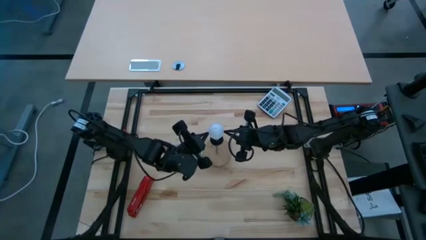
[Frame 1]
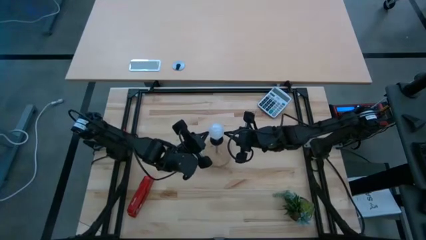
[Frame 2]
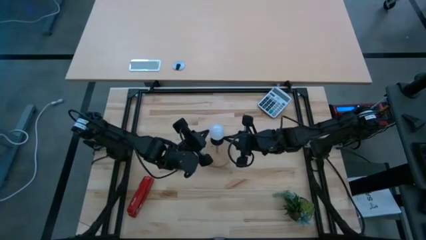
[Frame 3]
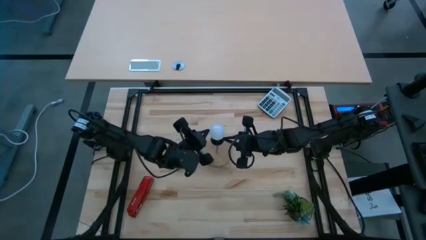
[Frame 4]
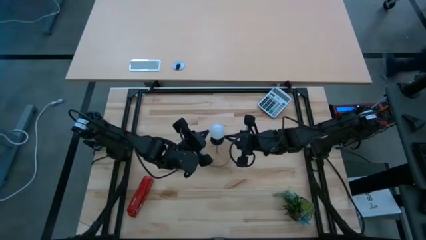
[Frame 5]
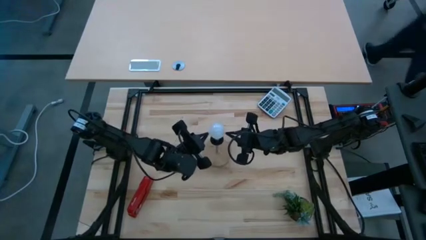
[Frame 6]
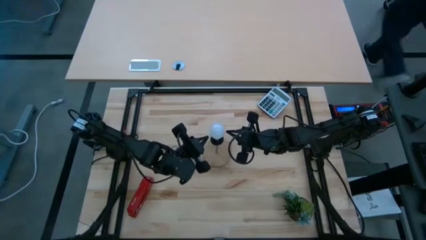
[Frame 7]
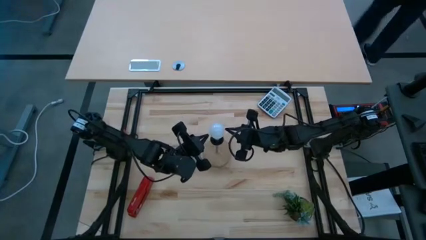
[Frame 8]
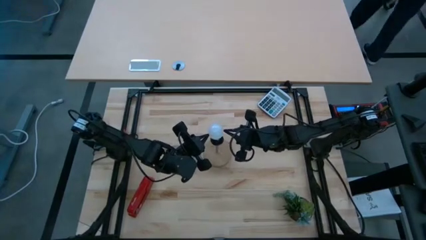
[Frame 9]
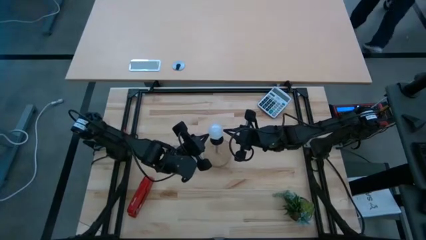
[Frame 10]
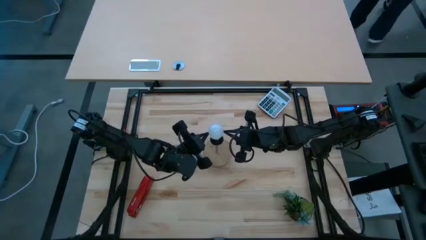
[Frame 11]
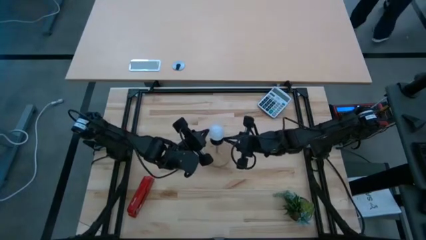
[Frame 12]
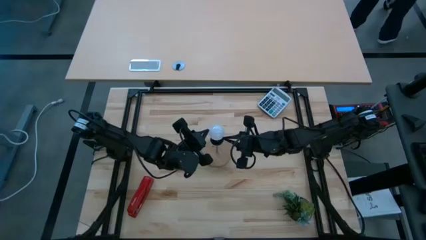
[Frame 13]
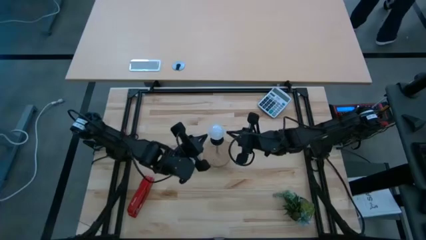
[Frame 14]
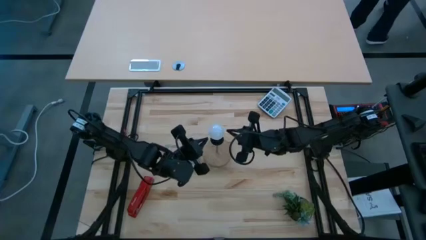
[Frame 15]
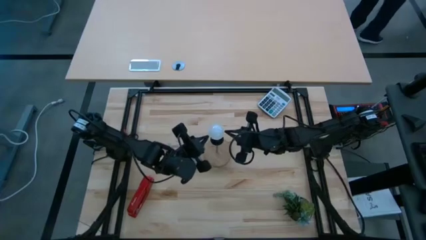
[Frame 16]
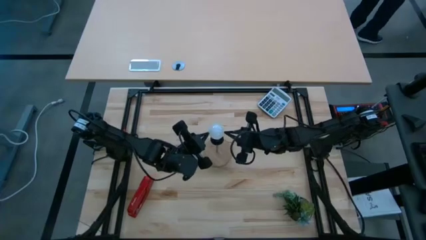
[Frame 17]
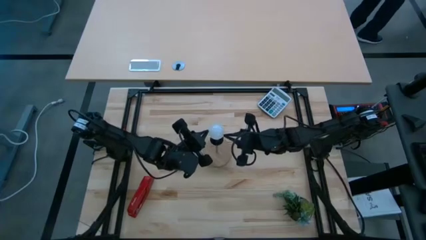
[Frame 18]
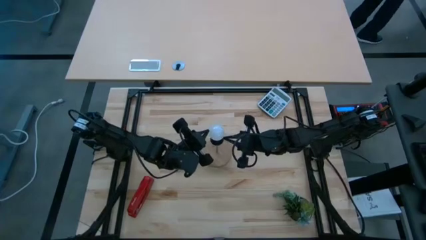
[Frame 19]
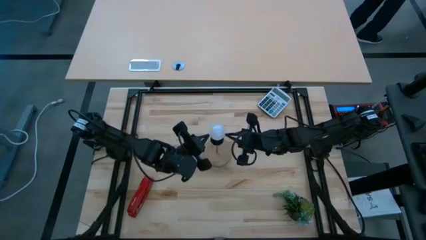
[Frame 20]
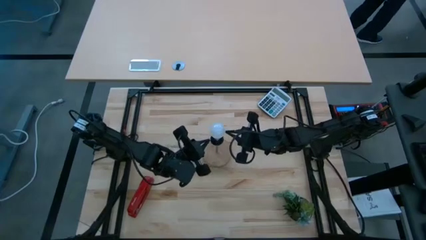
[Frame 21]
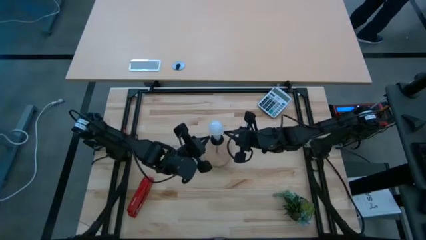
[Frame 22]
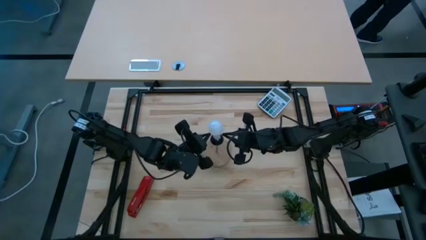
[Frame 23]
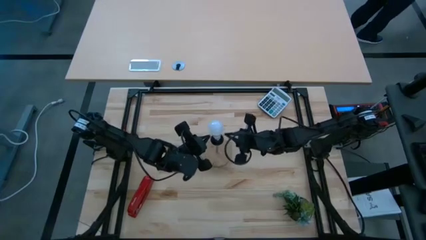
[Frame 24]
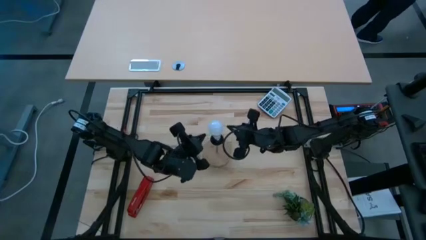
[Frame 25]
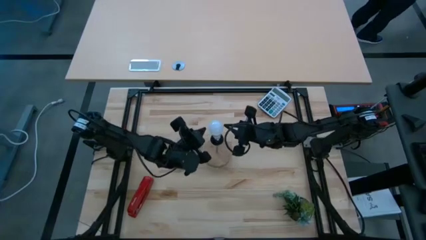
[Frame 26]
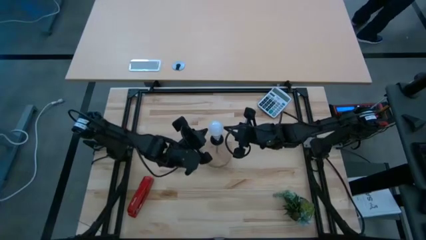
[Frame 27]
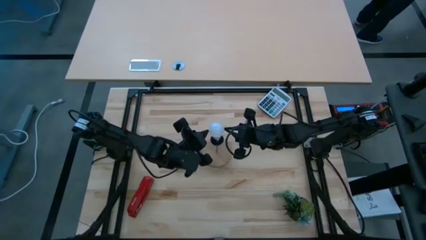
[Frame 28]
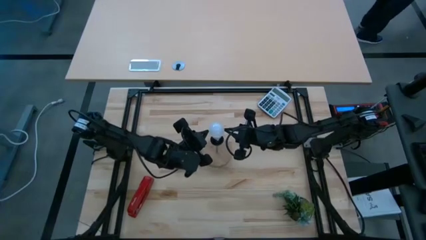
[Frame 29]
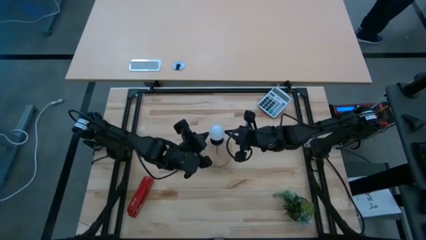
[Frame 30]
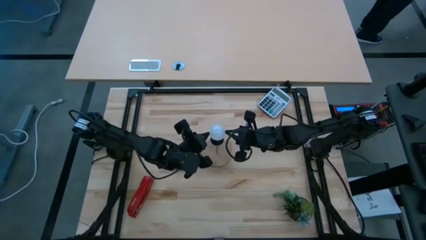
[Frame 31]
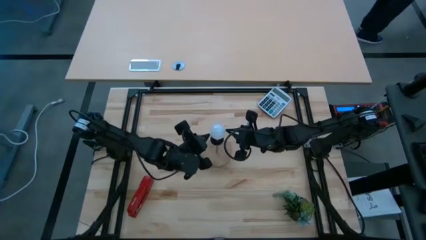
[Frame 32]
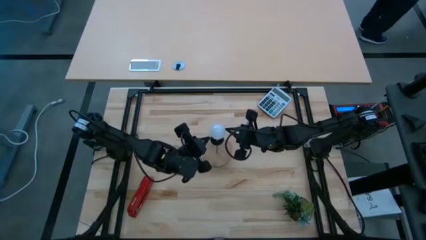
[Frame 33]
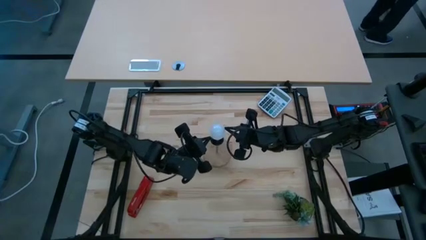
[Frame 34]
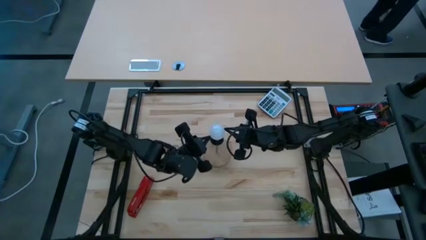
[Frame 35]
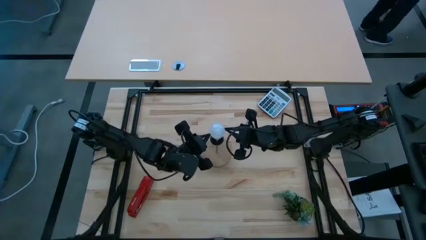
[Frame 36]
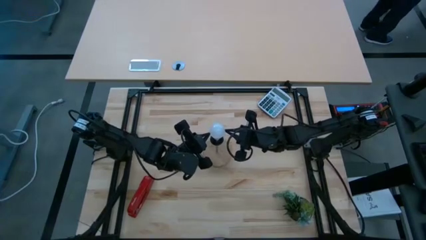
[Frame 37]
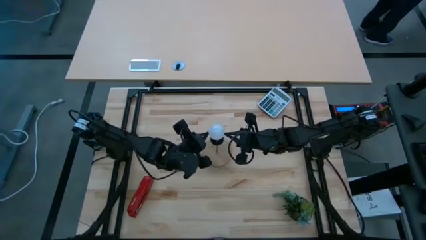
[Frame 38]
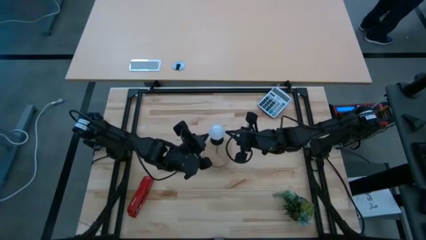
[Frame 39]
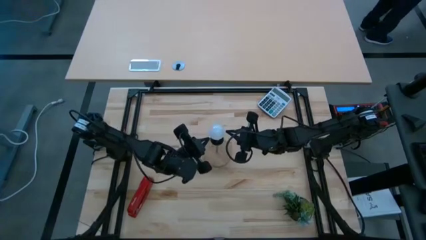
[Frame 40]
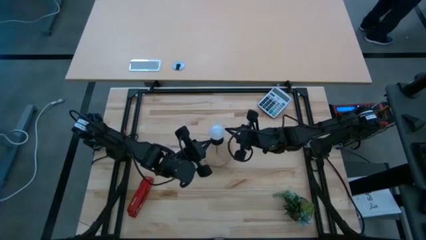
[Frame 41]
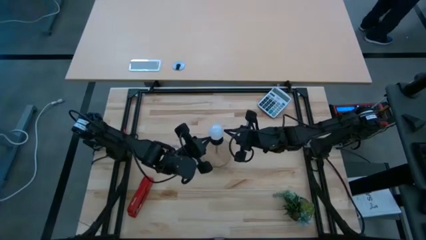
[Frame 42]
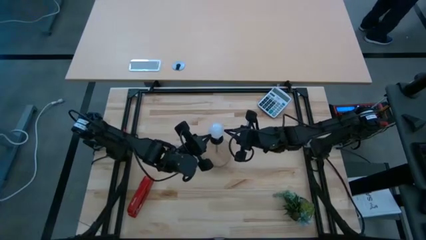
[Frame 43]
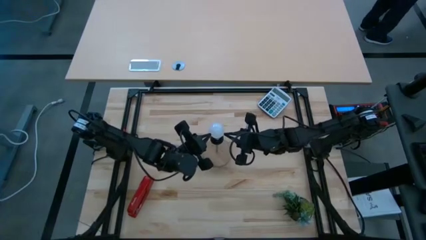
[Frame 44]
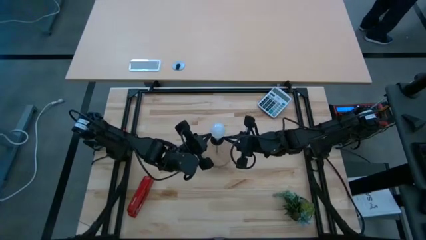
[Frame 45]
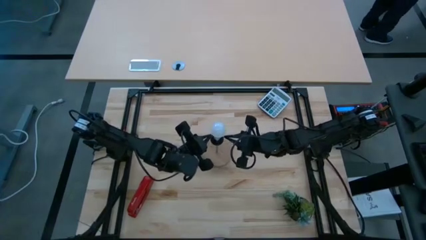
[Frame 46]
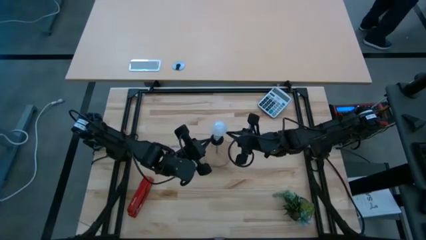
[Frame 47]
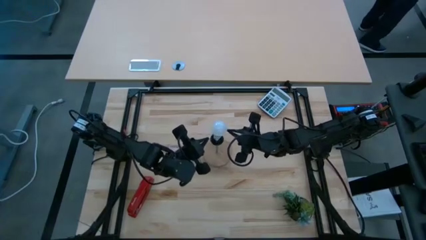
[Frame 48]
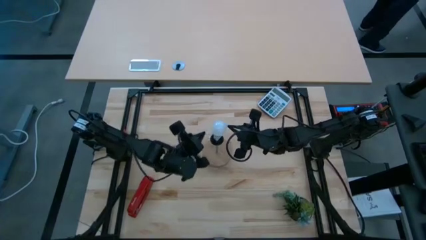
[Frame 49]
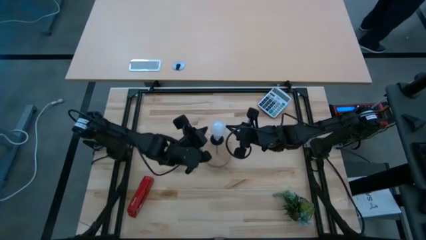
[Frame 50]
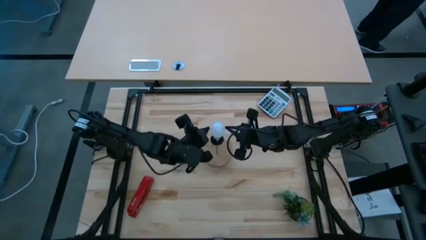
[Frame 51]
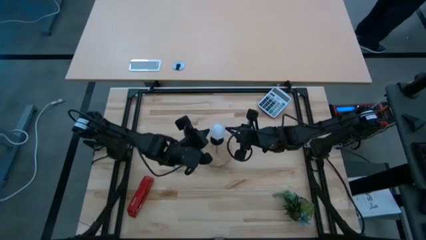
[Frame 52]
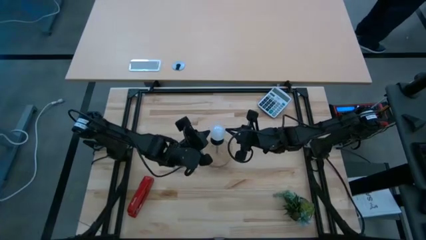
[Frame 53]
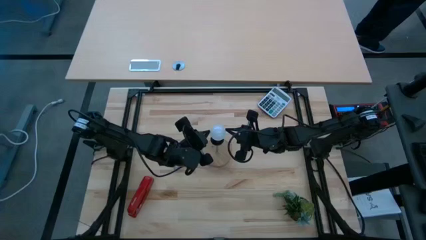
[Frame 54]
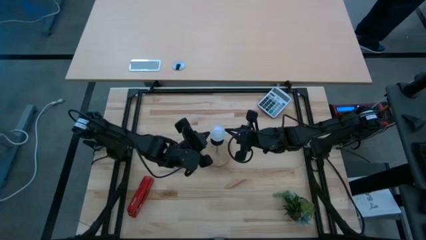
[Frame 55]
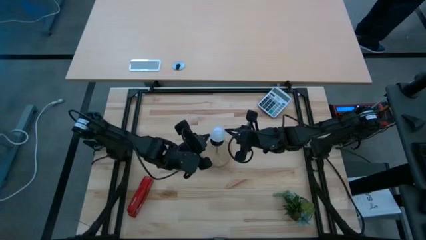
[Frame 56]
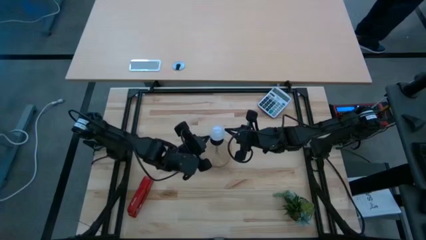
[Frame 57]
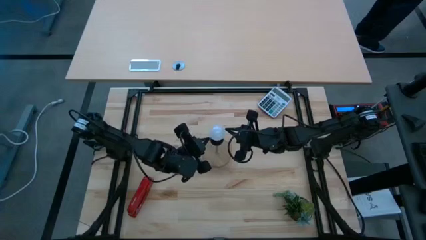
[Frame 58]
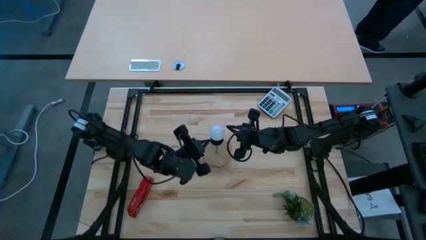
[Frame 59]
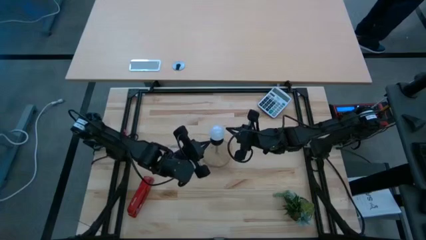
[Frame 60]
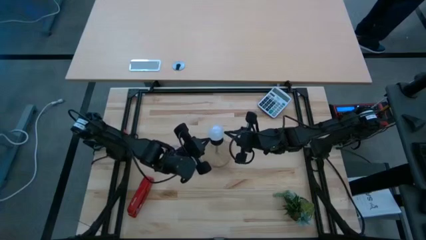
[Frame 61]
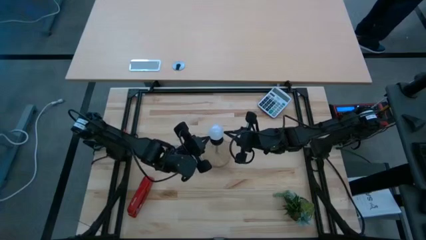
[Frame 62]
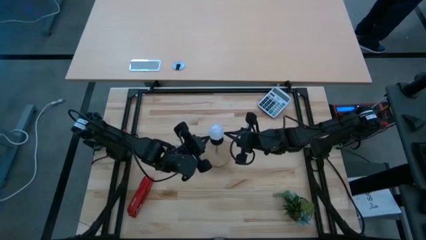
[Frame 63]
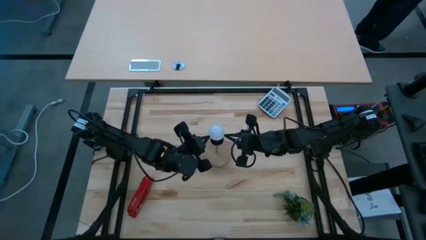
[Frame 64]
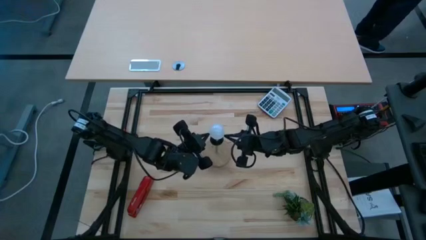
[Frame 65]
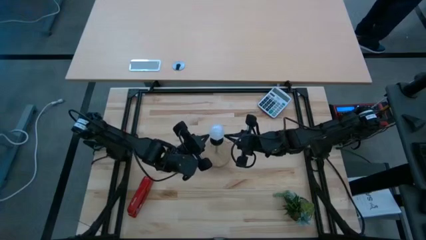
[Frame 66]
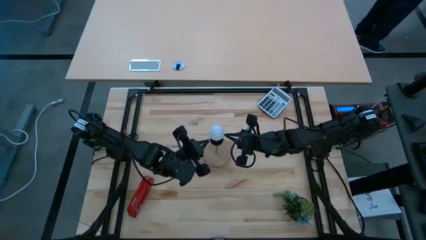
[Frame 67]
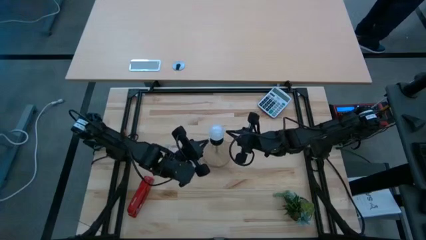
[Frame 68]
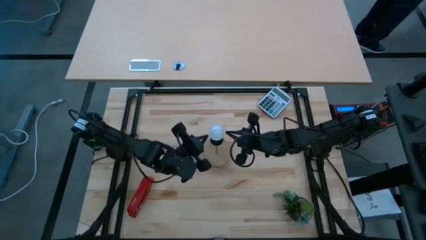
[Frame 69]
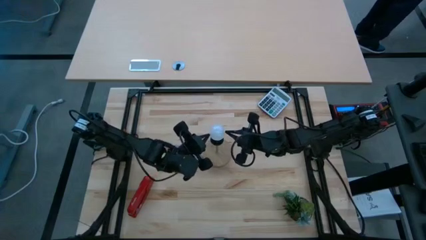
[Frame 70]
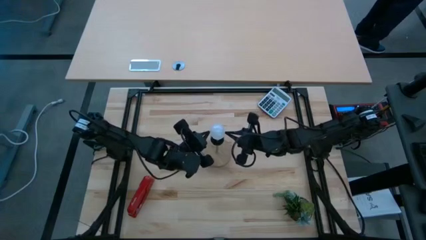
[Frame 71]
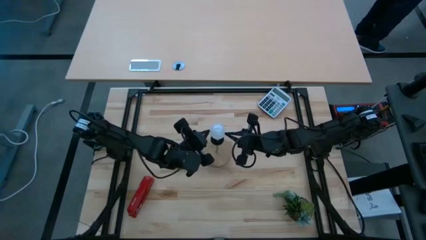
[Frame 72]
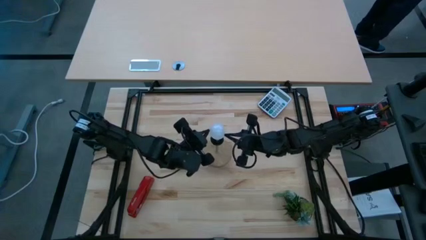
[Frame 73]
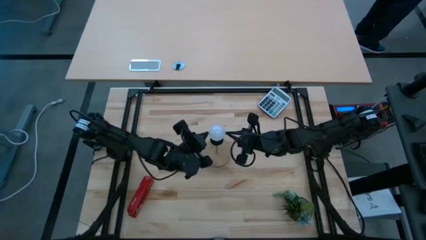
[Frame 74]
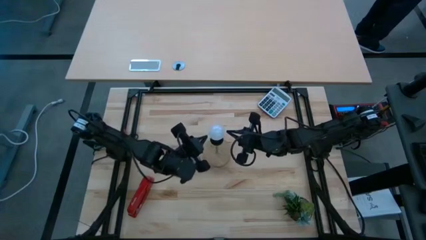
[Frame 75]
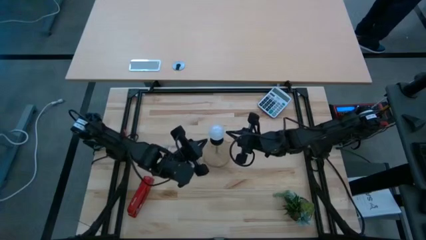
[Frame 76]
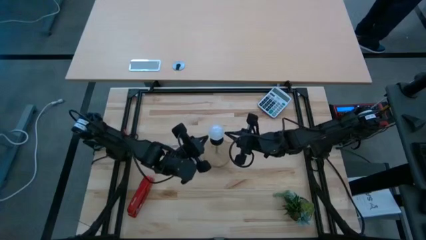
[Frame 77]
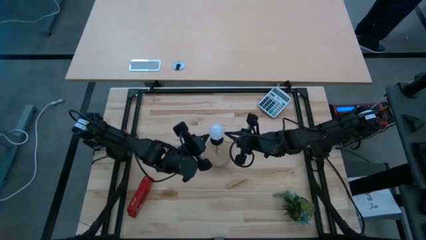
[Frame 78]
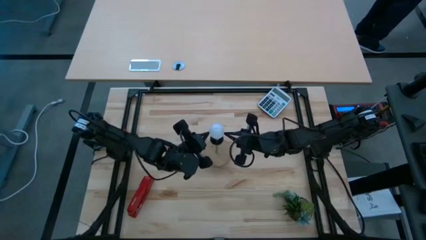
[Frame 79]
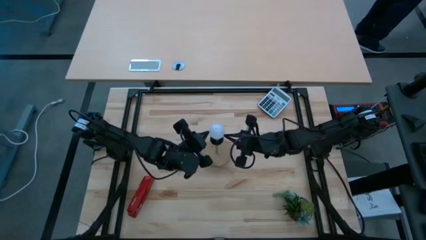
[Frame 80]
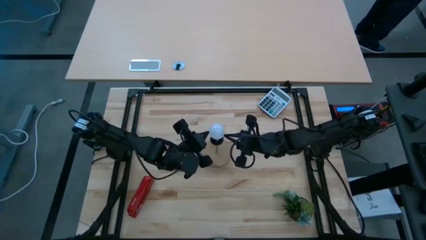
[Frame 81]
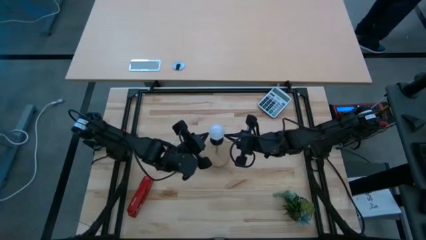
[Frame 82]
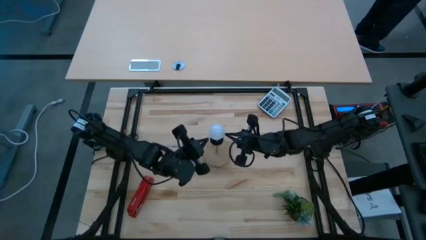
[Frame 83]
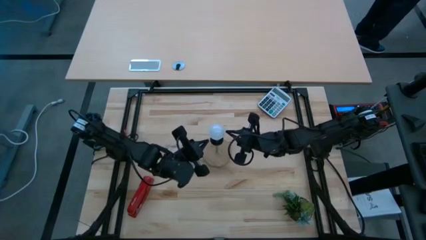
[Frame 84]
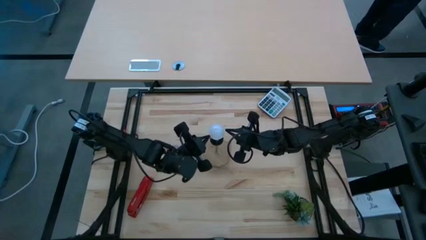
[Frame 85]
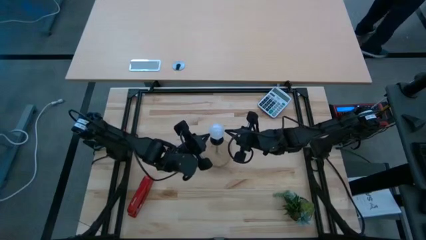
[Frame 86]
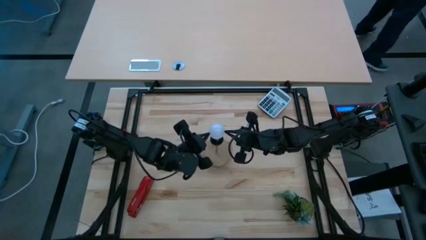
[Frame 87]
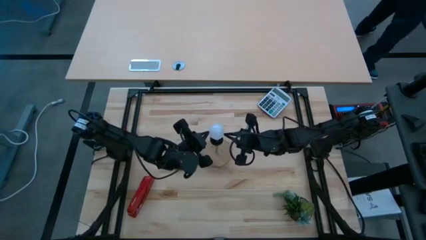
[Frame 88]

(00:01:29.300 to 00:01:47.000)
Task: Screw lightbulb
Insert the lightbulb into the brown lamp
